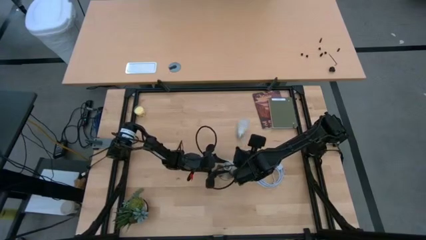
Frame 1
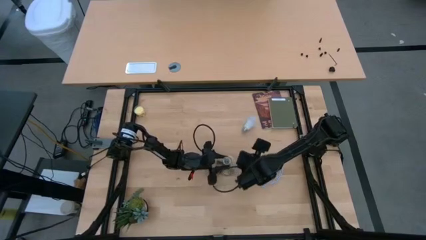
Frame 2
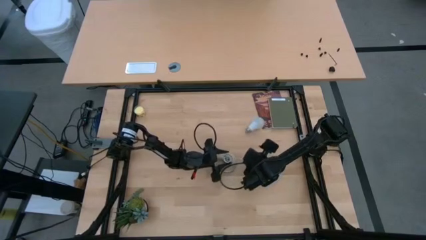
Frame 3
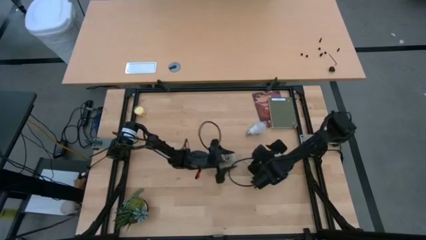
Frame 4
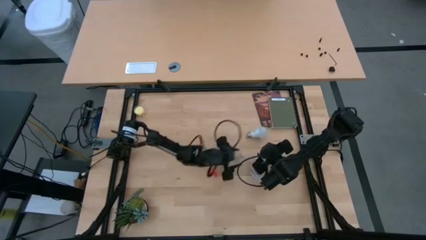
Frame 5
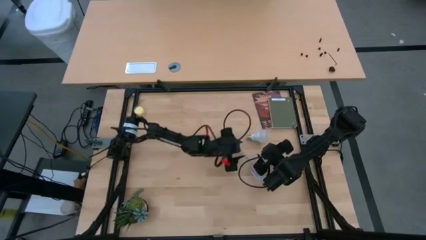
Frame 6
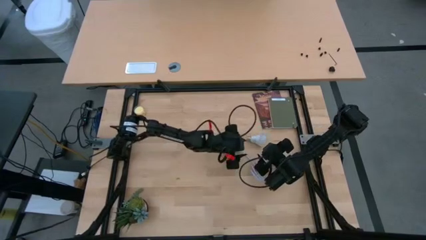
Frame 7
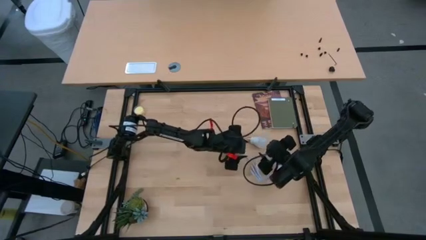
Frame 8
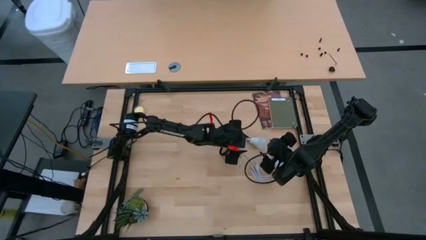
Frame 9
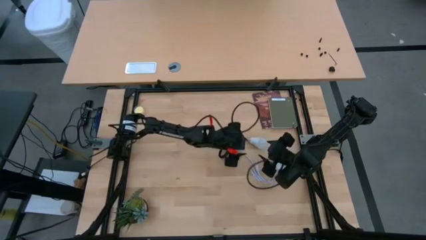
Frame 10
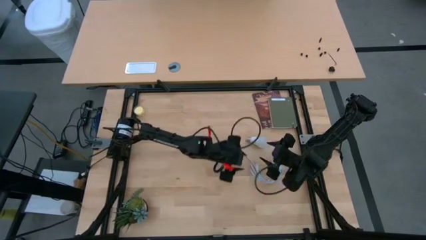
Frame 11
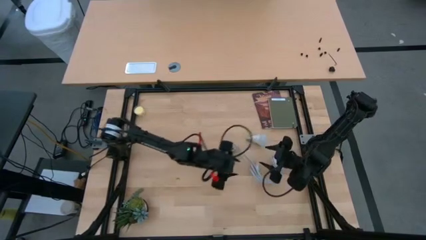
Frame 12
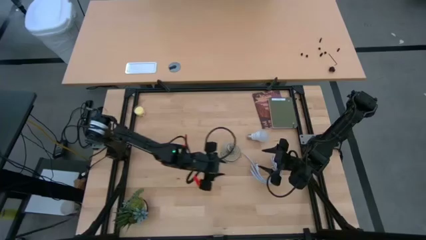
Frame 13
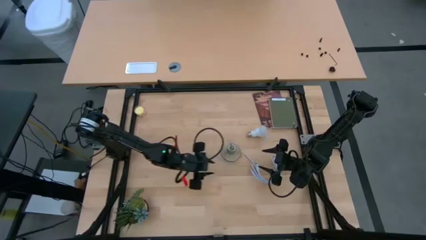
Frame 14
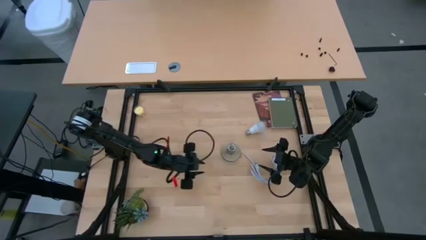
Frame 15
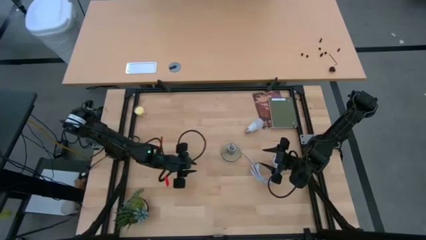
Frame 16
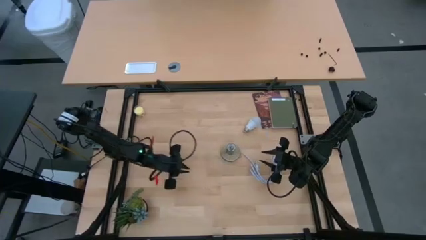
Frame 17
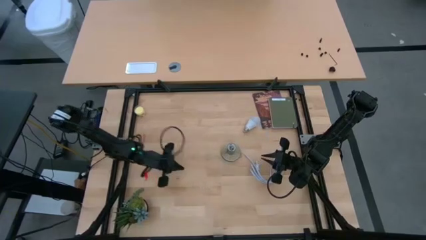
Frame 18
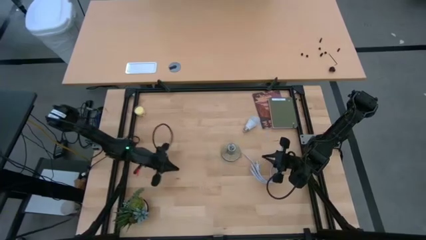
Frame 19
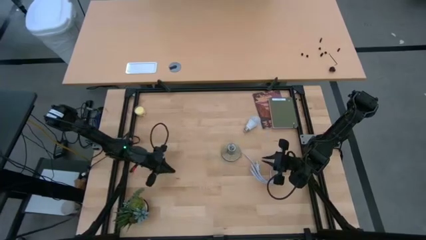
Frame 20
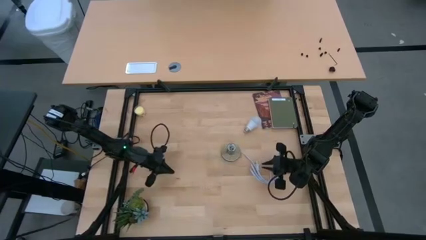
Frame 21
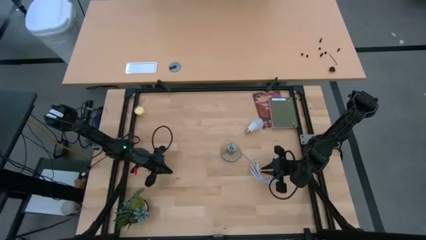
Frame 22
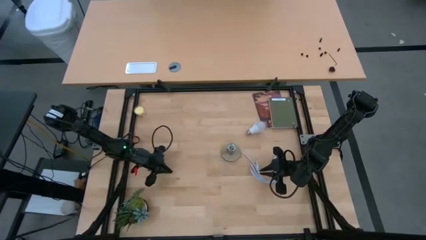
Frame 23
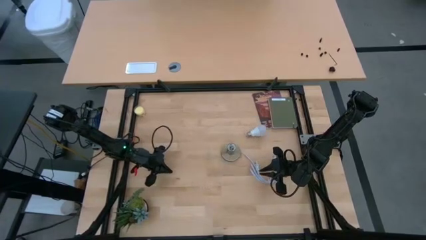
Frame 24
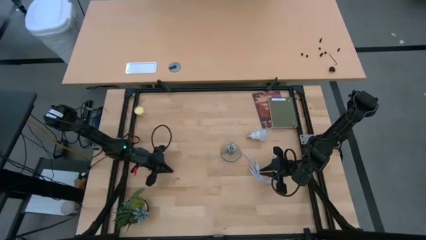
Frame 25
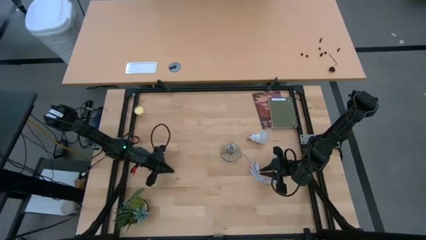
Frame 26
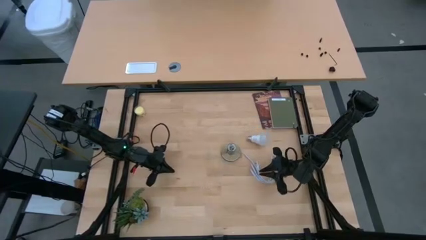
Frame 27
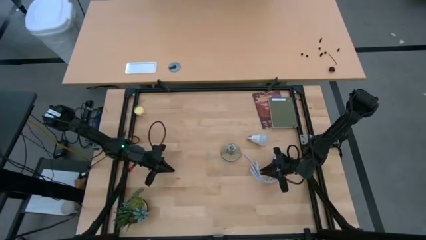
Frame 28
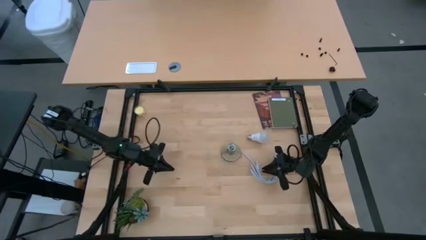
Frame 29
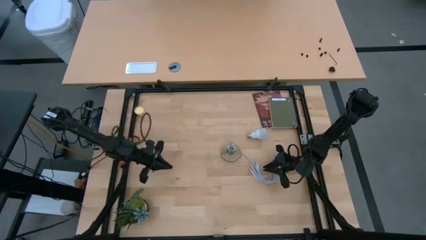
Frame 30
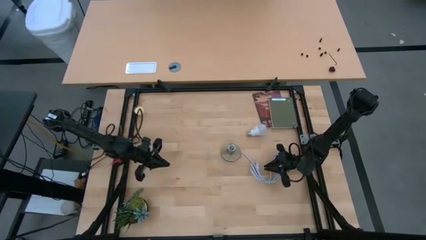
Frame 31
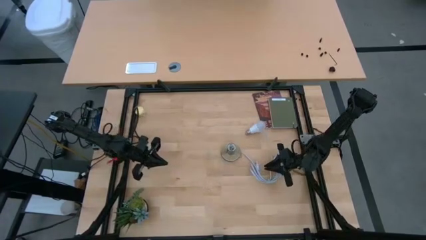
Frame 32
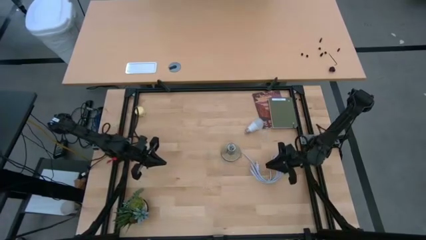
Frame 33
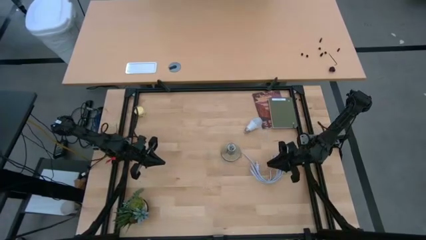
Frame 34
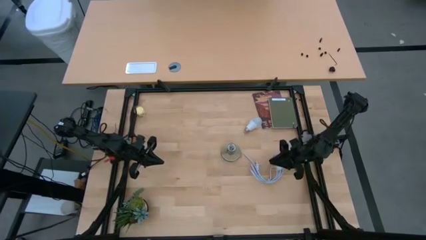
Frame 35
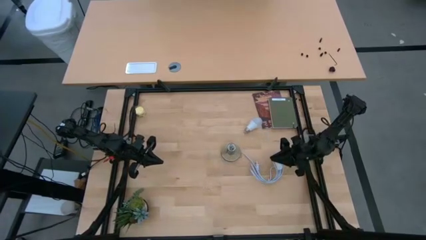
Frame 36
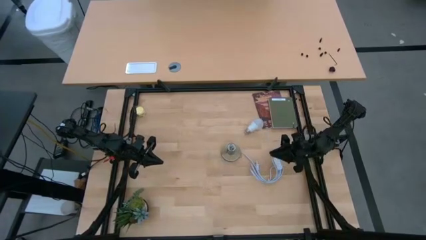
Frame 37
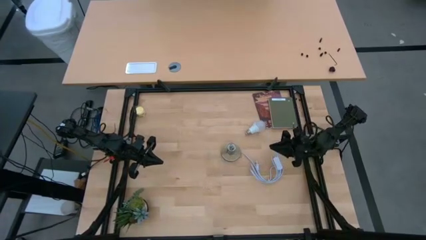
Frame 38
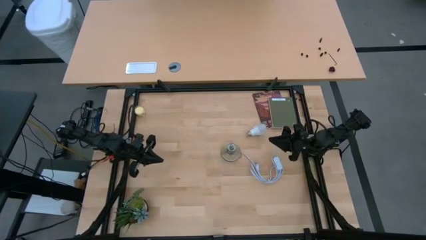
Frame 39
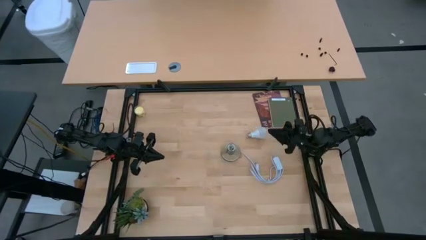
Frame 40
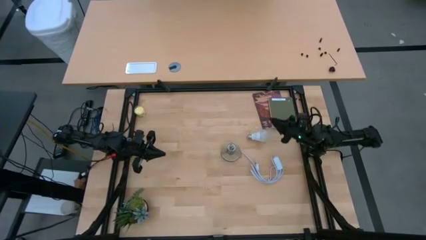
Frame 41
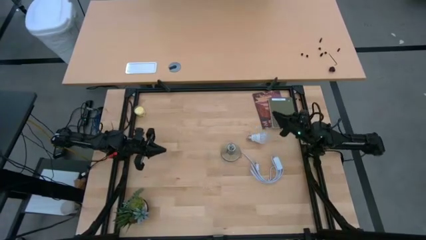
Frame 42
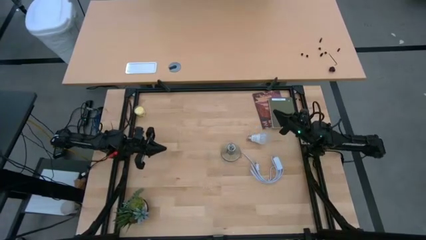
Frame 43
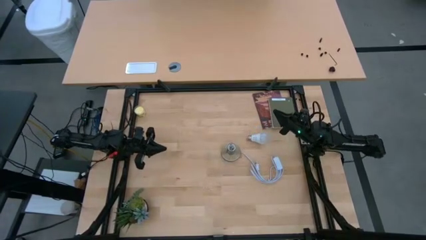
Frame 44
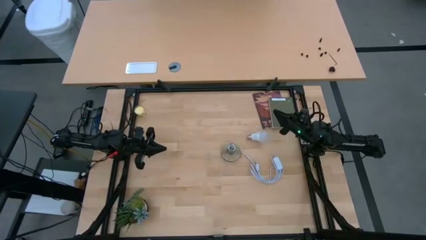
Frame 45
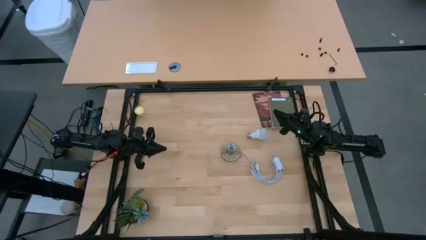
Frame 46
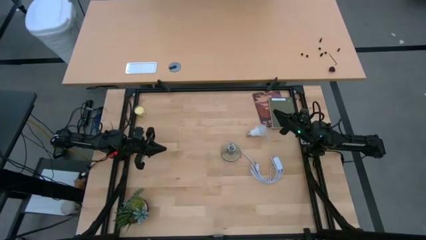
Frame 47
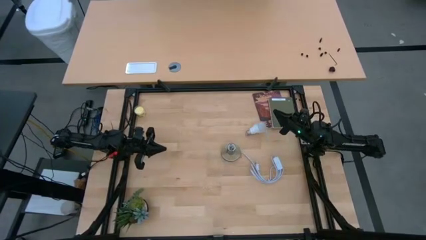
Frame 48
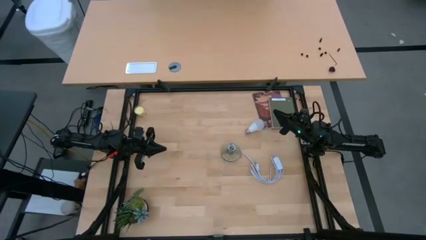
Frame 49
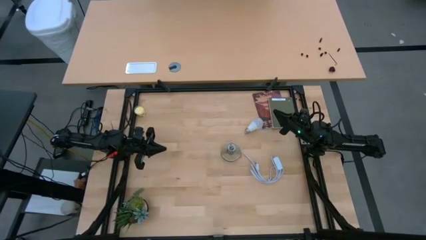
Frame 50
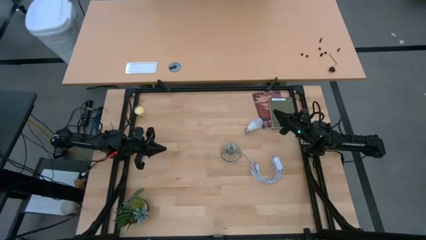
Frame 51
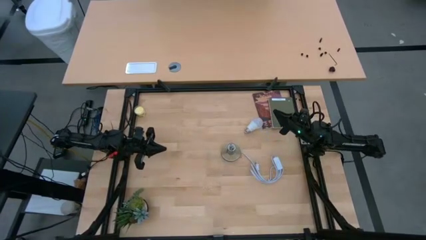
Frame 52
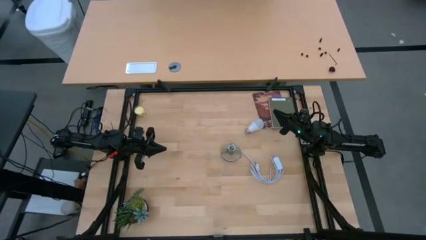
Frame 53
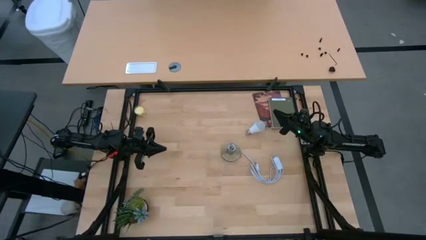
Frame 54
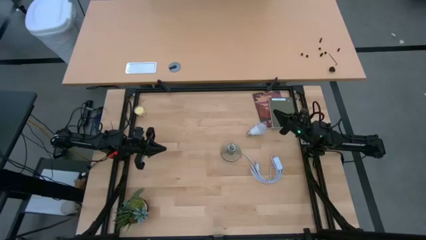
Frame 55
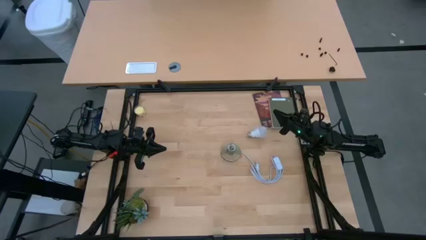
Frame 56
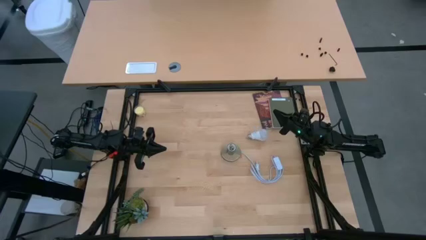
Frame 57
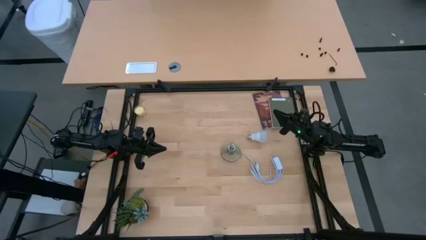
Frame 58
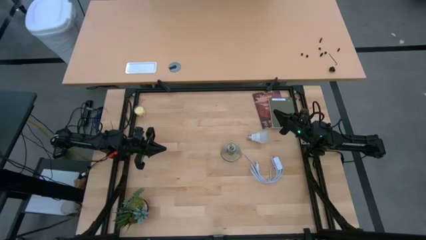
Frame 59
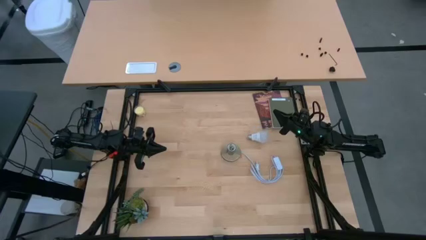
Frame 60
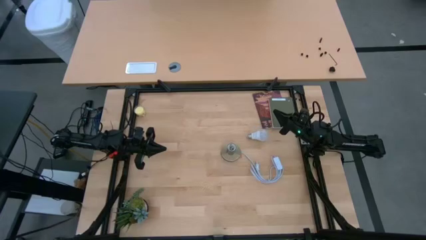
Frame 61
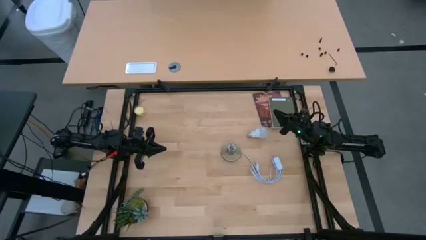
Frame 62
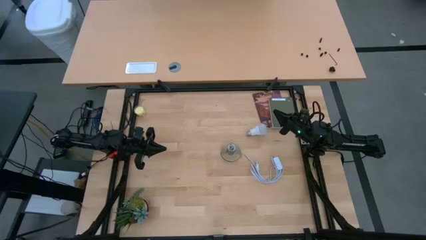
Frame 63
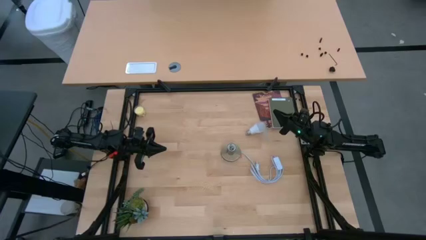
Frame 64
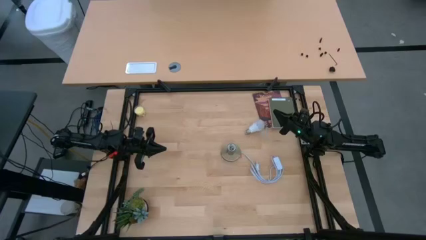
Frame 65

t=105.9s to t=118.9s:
Task: Screw lightbulb
Return to Home Position

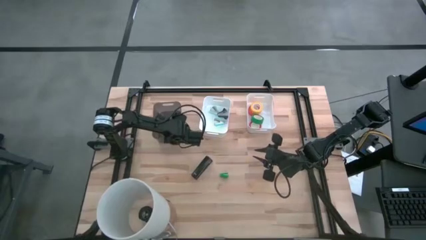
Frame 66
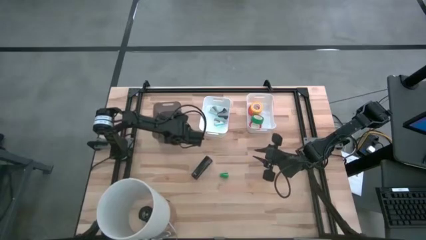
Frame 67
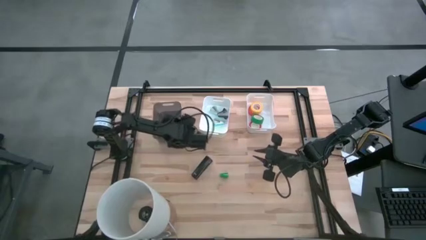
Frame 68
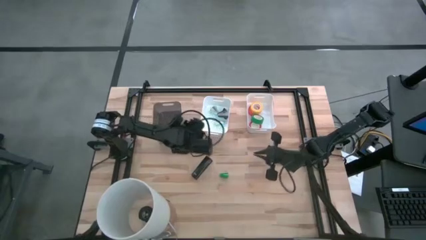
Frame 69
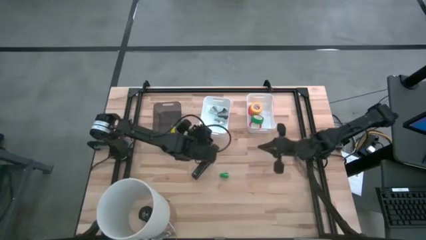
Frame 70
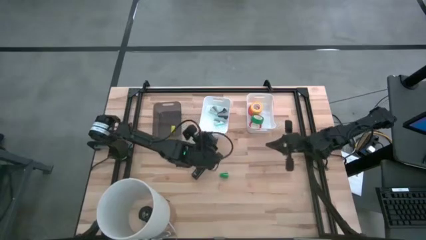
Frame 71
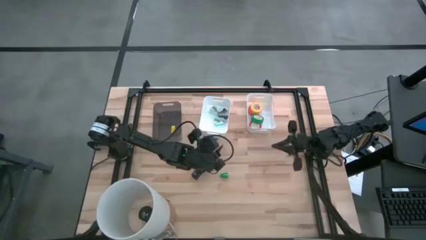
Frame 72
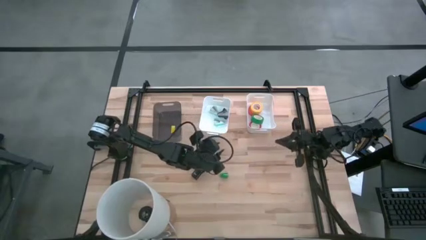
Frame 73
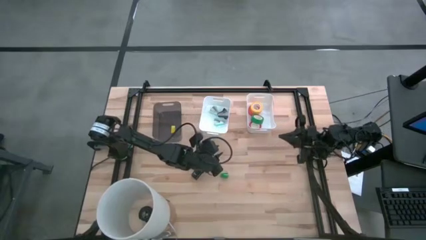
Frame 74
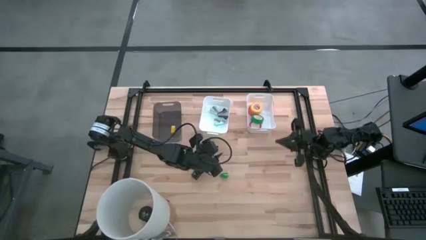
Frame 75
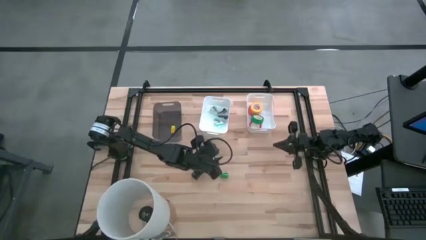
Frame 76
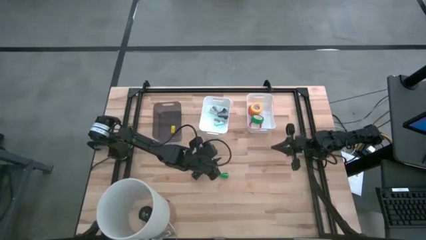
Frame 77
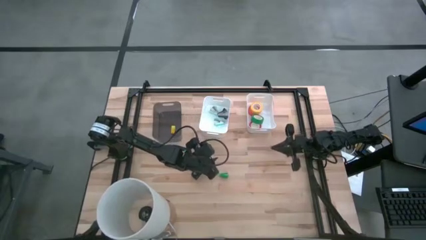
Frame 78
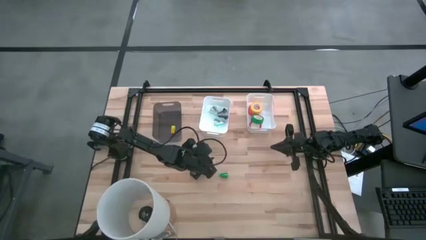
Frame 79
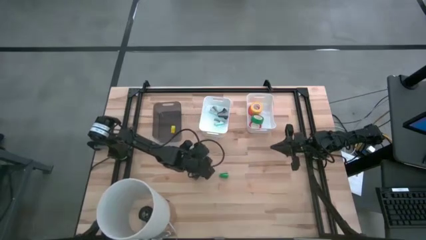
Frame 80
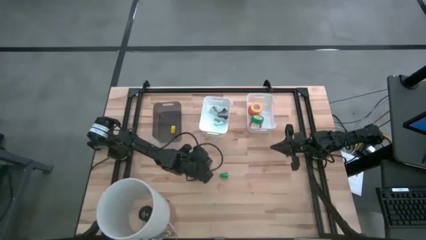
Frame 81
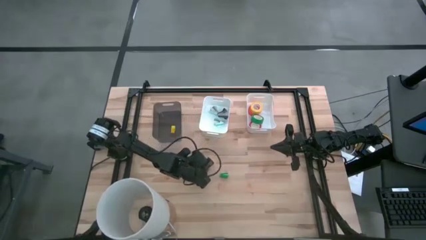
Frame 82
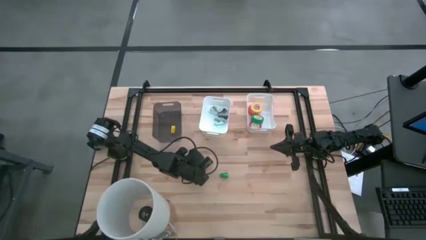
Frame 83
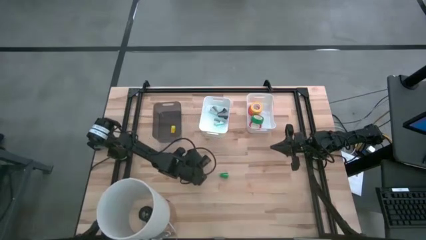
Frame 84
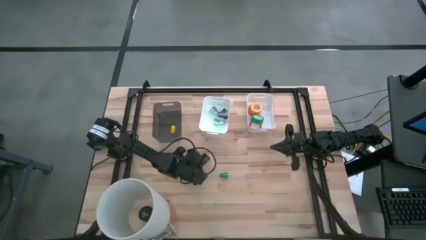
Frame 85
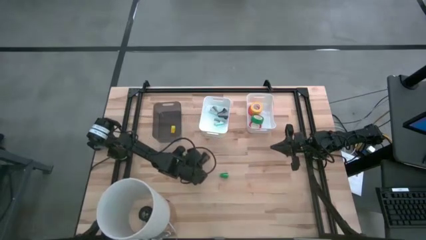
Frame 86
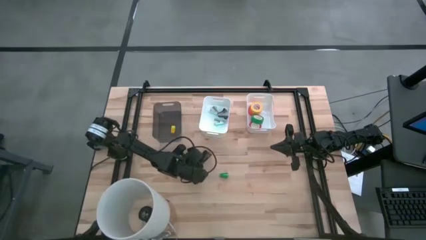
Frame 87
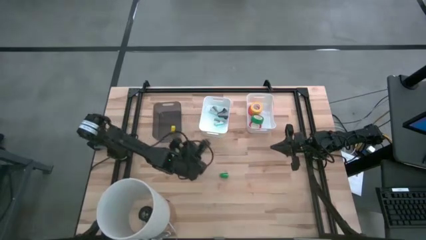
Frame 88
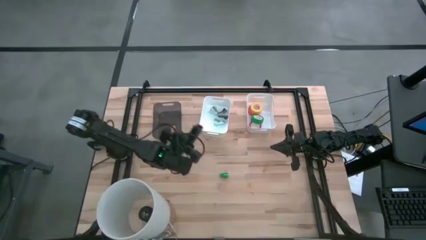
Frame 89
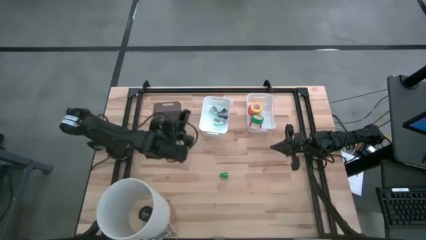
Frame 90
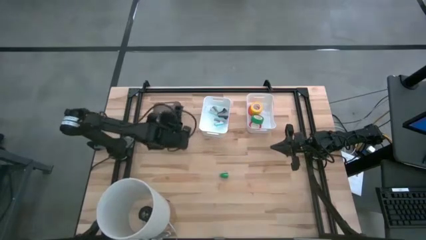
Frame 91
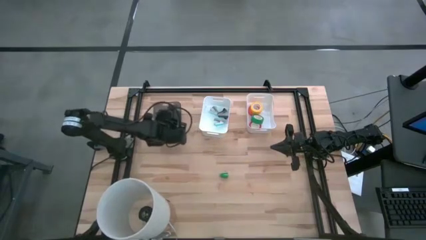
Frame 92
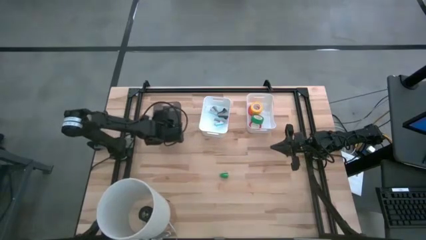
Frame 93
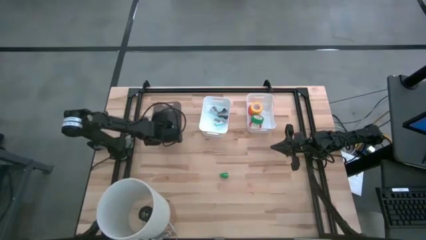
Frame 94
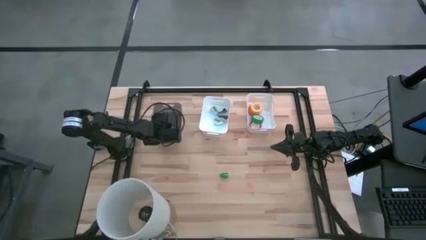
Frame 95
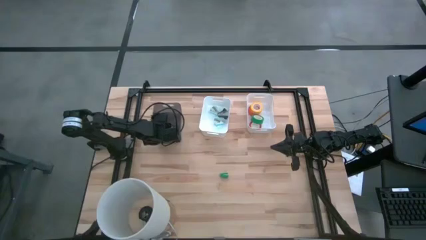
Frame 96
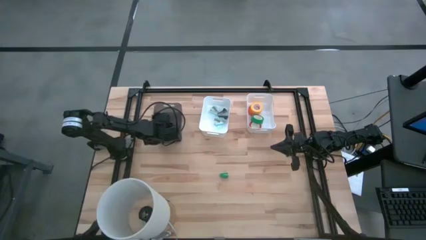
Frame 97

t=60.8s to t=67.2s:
Task: Pick and place Stapler, Stapler remover, tape
Put the black stapler into the black bin
